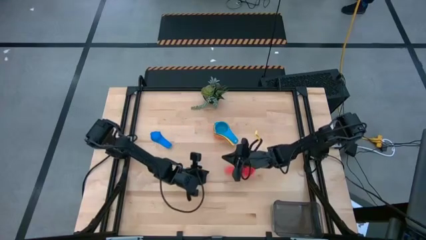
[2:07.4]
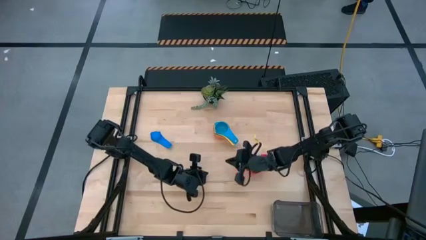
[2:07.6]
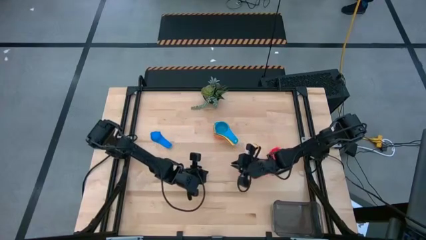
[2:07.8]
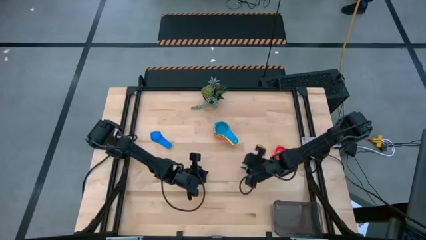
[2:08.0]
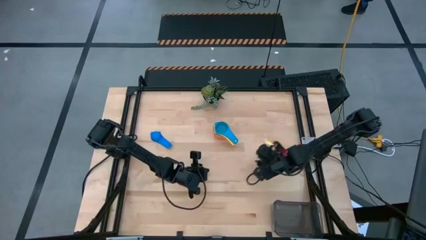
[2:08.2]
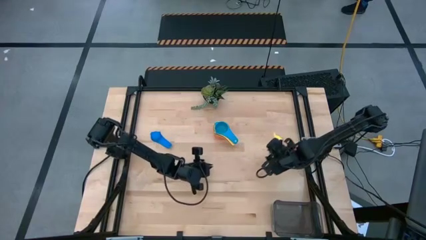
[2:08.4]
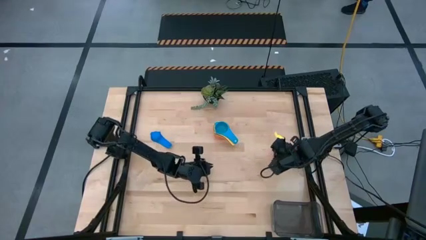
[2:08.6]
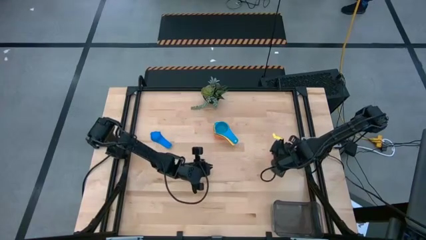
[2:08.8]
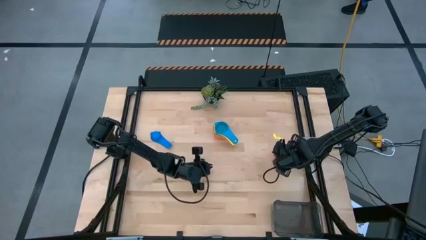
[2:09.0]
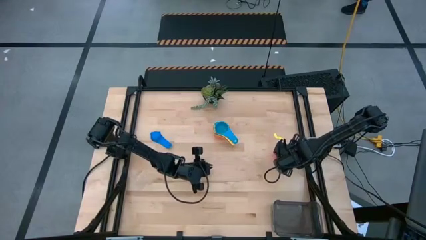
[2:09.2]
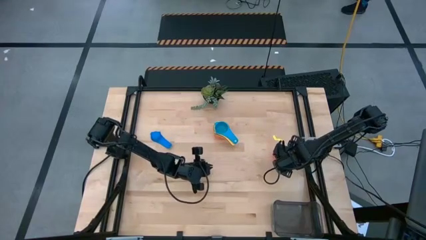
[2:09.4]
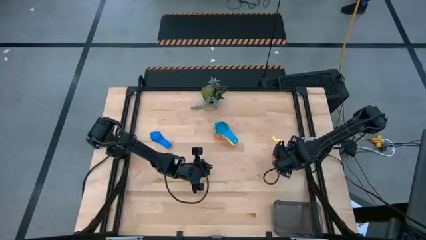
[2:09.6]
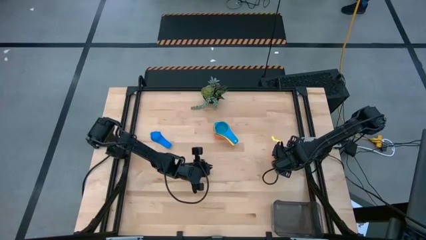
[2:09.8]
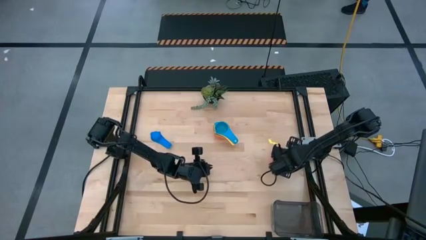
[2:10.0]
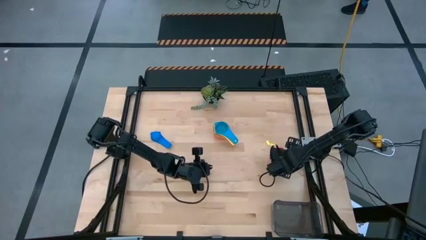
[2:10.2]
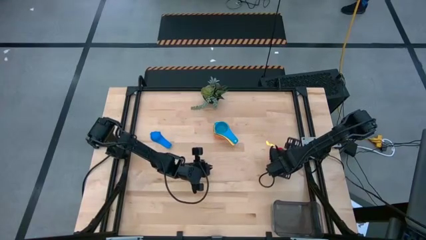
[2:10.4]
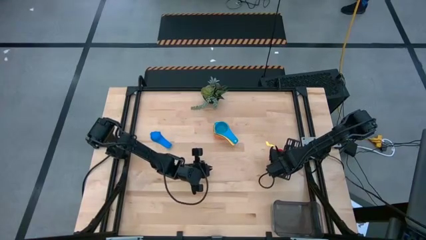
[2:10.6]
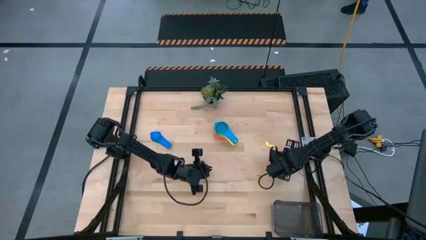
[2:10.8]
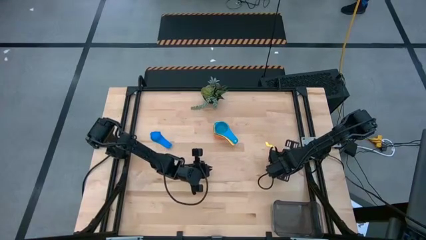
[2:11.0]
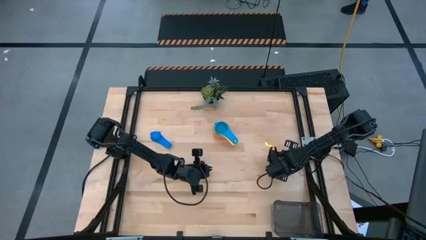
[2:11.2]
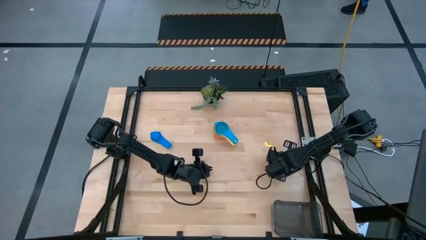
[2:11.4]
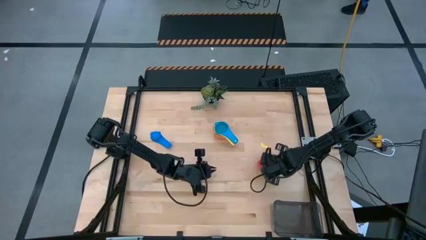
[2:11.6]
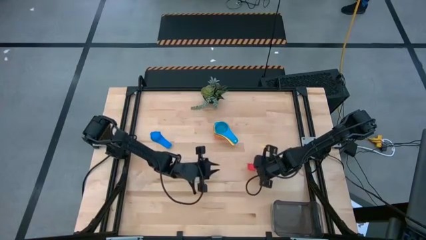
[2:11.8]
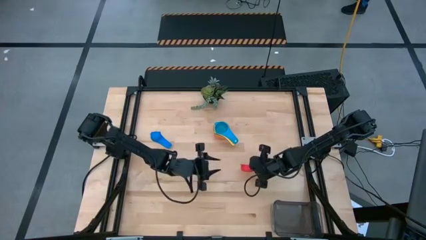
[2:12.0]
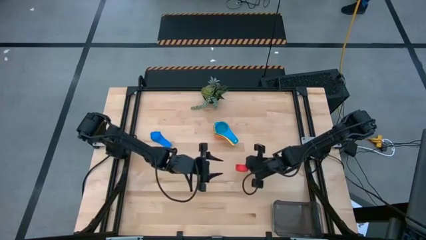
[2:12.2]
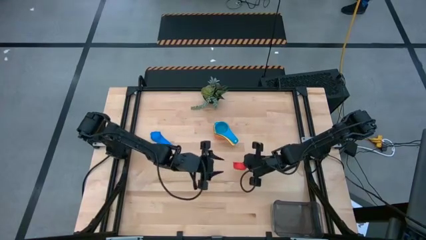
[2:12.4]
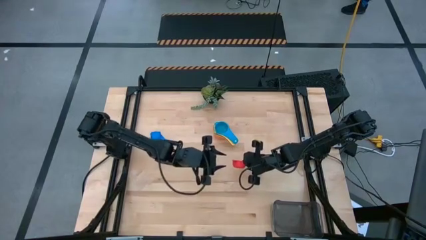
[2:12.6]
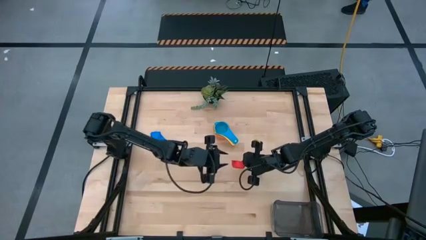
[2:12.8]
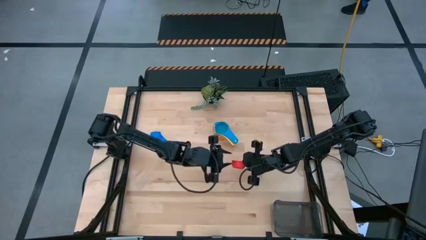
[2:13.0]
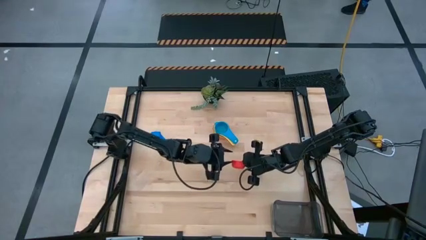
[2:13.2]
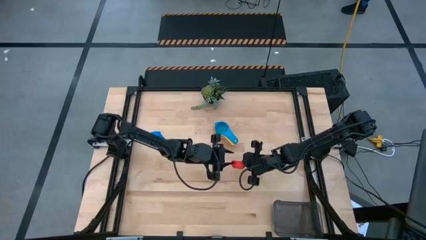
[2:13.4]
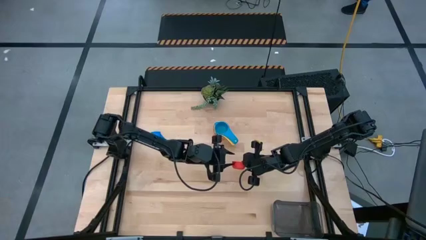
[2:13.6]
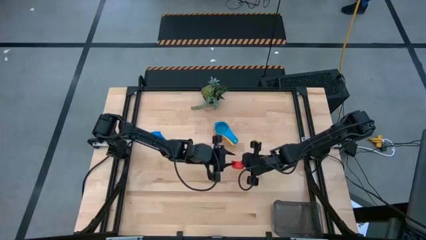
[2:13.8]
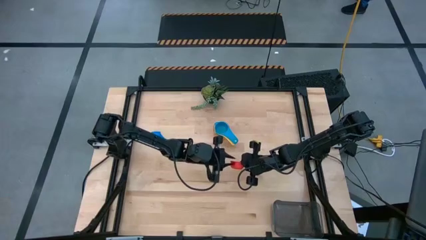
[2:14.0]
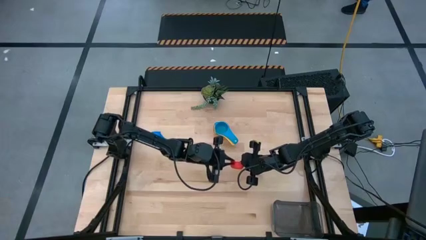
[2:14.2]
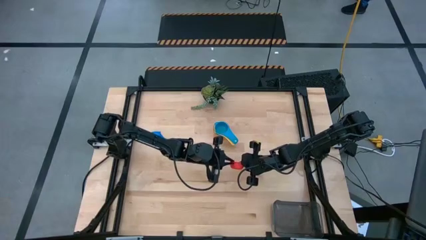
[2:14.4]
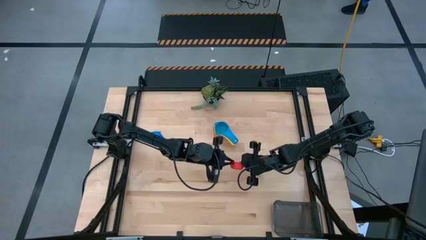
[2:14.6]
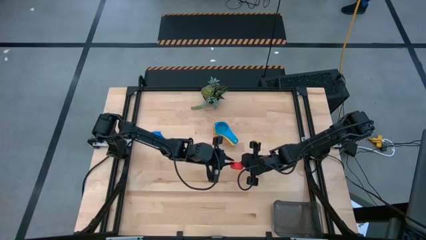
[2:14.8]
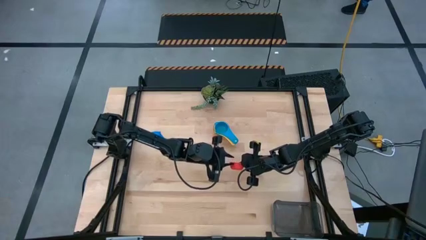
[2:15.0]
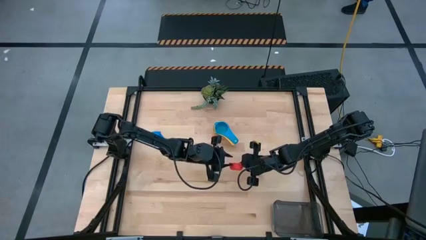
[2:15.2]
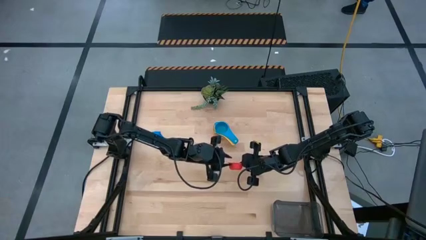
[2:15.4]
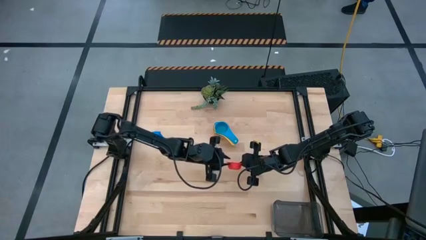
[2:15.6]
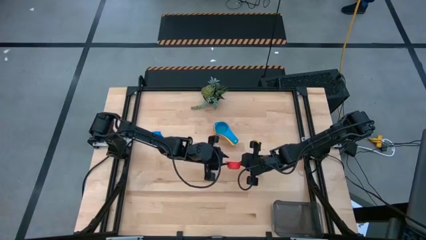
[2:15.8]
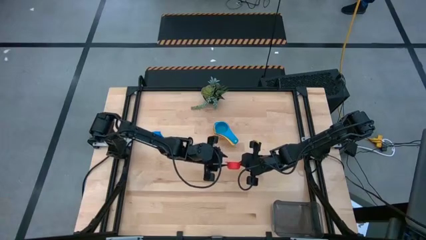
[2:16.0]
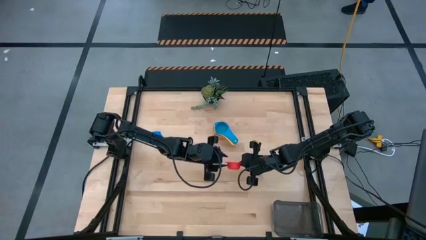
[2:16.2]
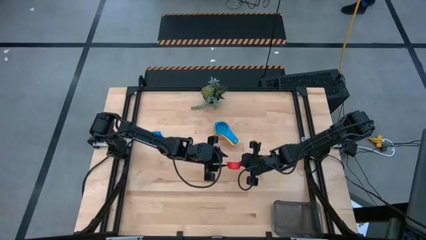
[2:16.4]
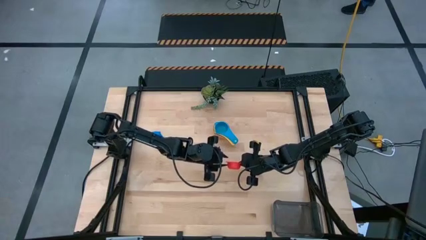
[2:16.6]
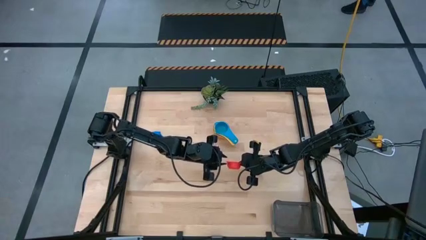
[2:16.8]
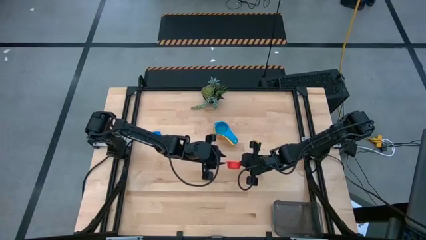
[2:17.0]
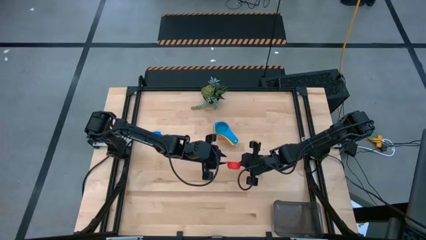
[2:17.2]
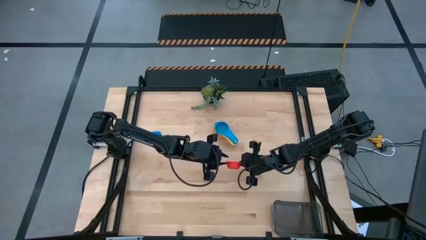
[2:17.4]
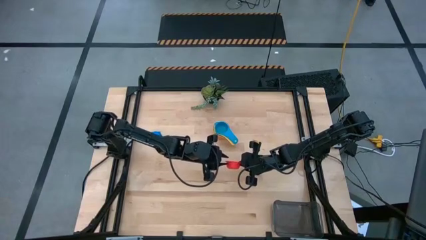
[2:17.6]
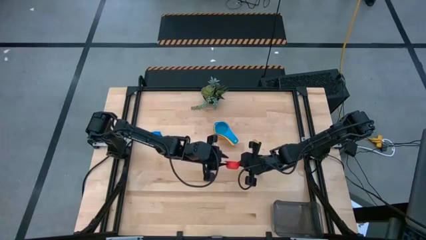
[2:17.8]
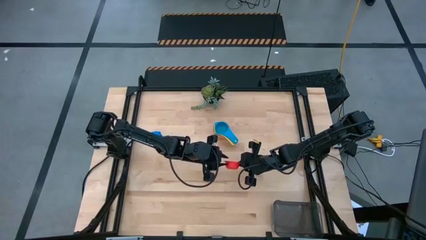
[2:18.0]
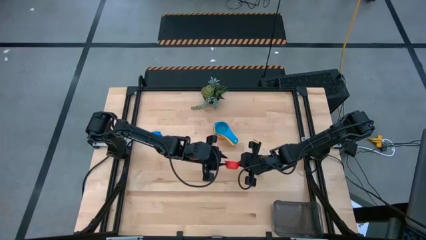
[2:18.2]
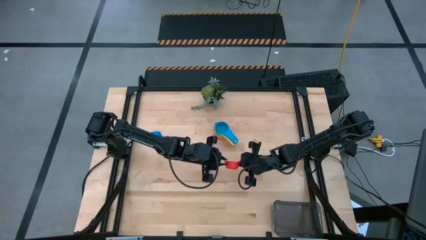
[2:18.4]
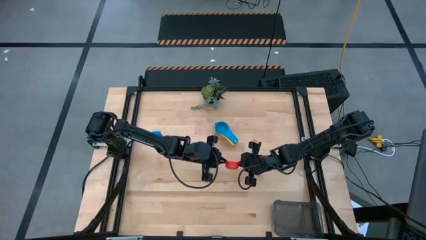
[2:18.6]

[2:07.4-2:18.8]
Task: Nest measuring cups in basket
Stack the red measuring cup on top of the light blue measuring cup

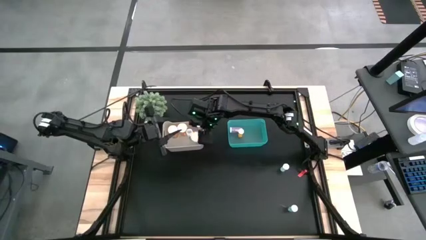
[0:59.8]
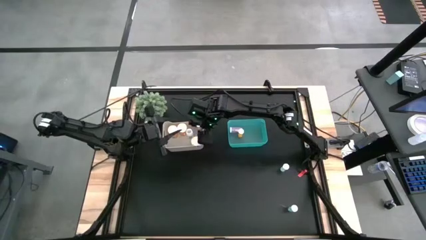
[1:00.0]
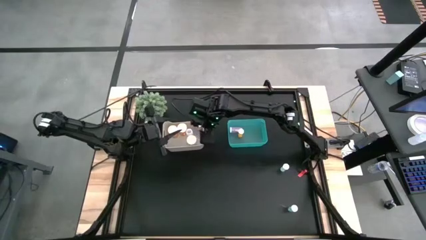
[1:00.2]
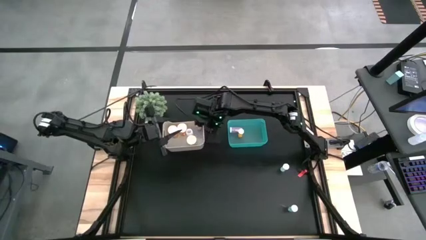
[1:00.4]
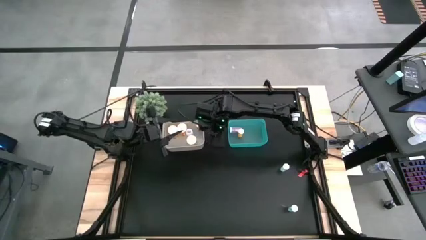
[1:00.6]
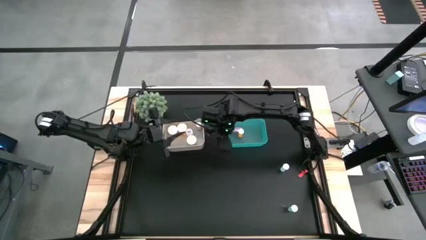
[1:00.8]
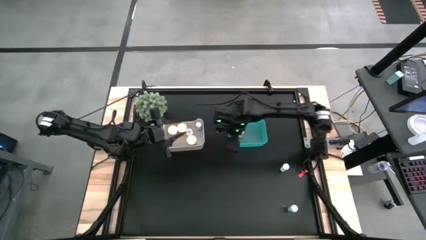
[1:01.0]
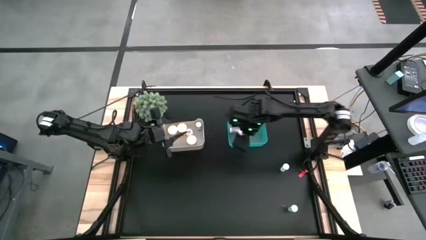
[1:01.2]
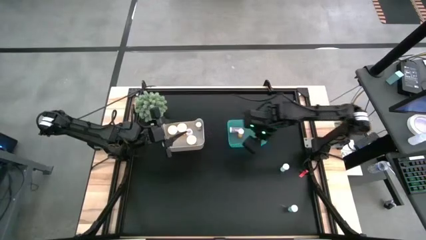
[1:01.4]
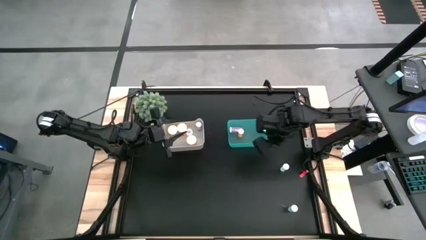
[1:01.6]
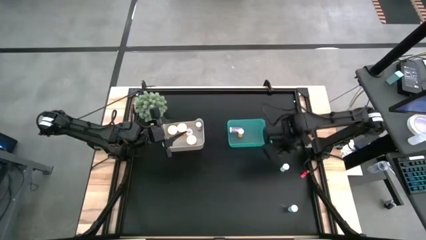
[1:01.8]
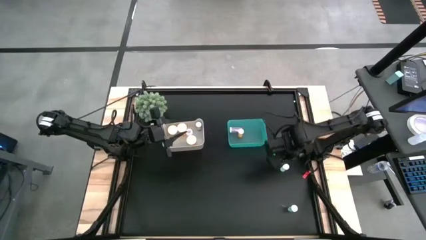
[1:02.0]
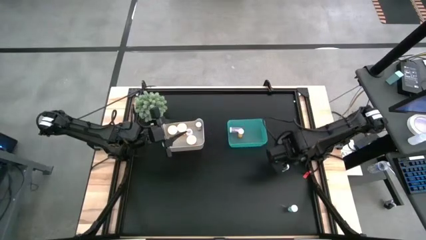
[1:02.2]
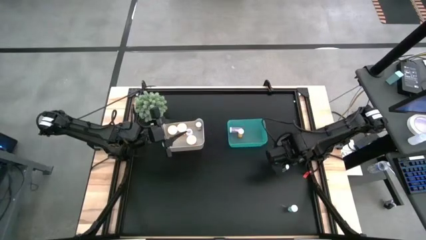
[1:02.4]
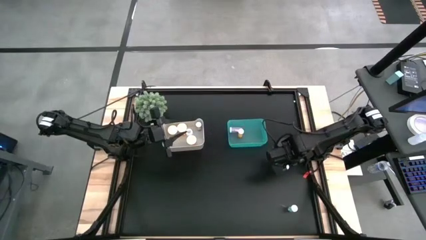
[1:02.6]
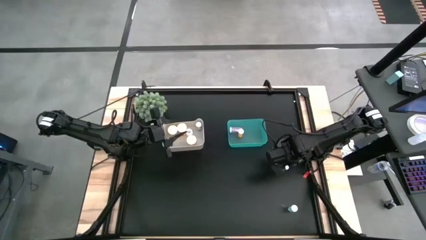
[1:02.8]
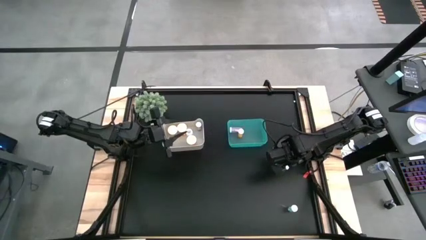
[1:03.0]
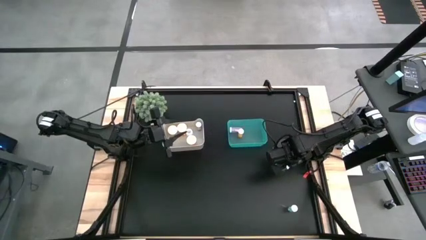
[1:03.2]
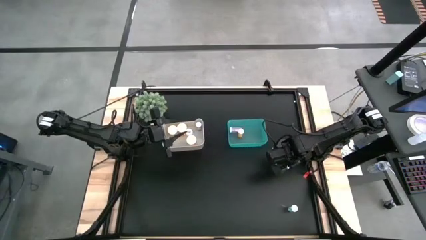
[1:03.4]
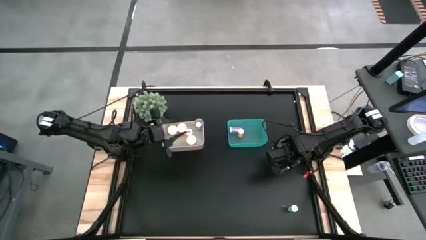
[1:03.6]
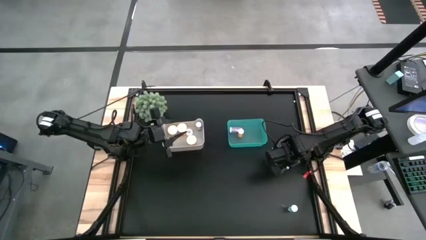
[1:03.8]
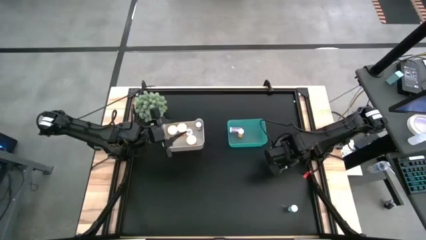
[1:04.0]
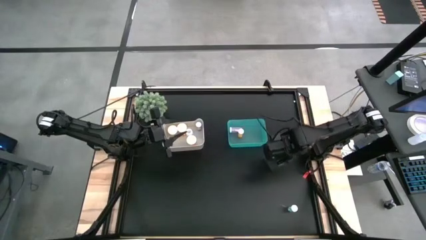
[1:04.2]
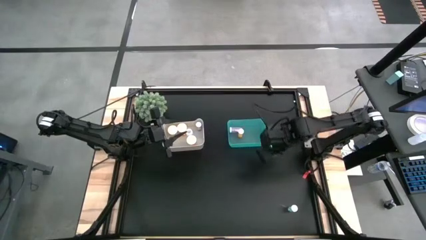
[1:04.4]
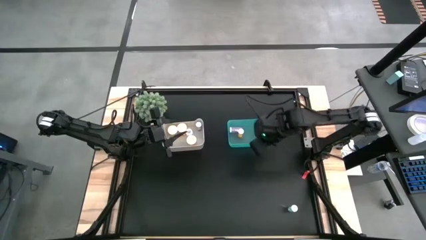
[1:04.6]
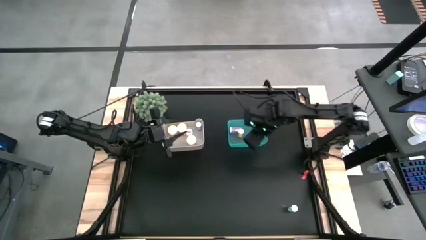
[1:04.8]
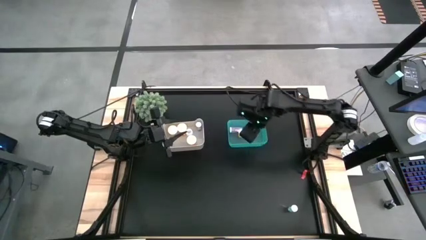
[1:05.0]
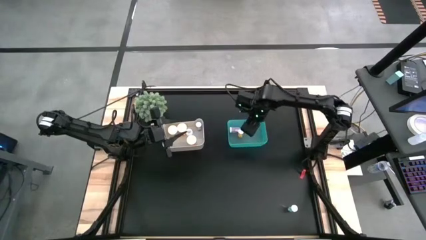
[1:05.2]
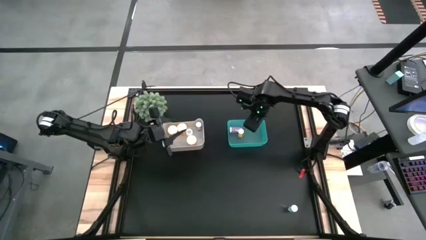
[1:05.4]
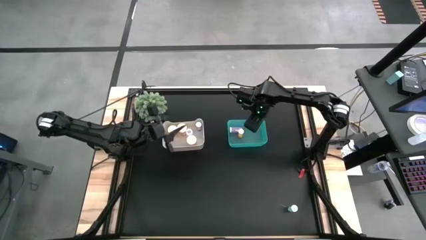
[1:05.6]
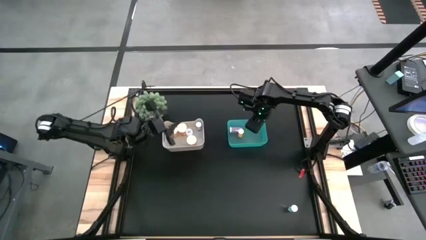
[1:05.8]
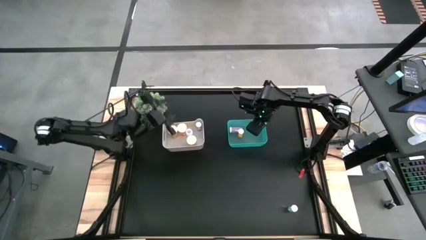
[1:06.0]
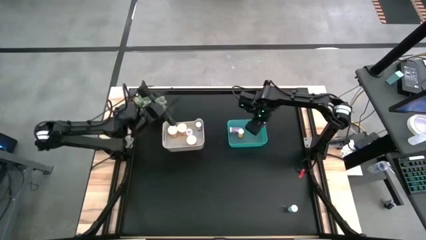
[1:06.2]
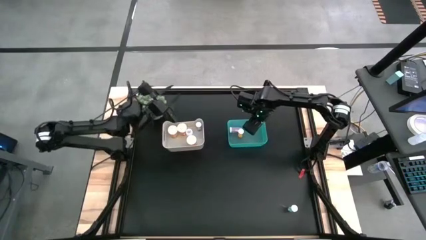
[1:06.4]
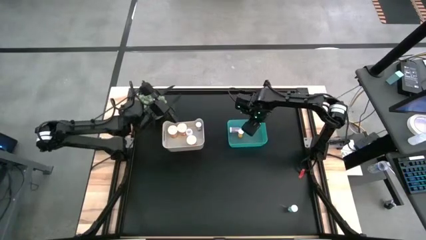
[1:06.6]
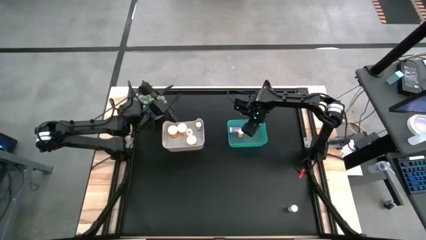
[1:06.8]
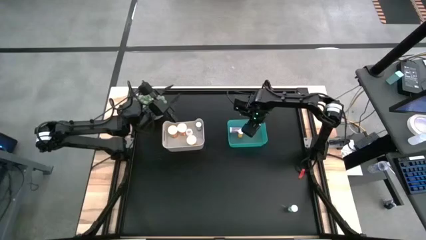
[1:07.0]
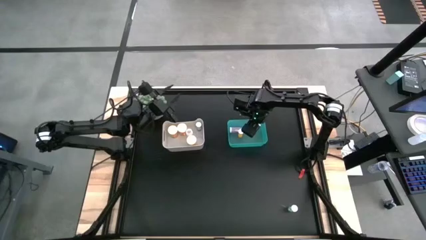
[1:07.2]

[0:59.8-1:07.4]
Task: Pick and place medicine bottles into bin by pill shape (circle, oval)
Put the top small green tablet bottle into the green bin
